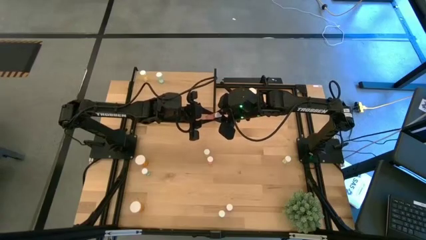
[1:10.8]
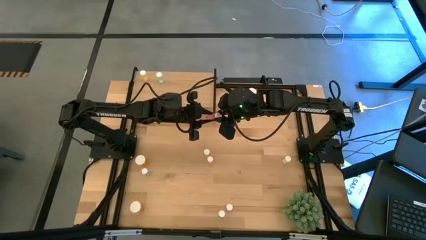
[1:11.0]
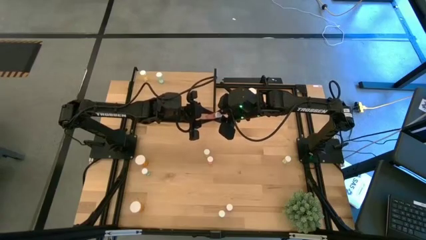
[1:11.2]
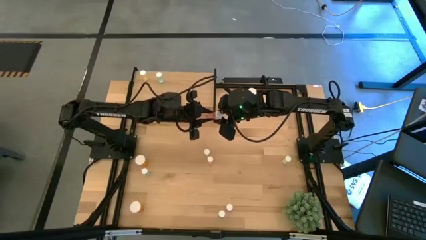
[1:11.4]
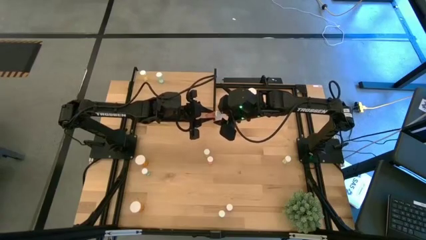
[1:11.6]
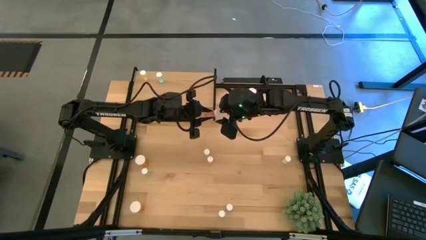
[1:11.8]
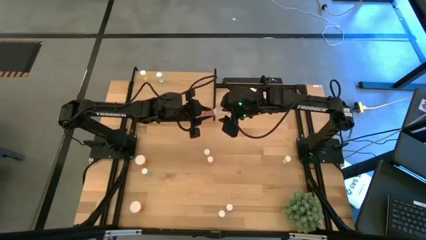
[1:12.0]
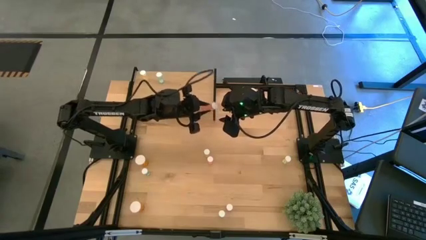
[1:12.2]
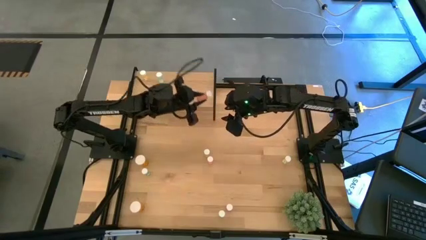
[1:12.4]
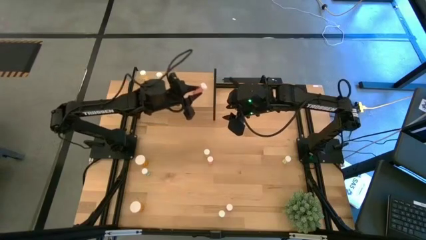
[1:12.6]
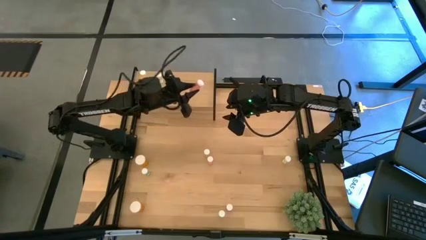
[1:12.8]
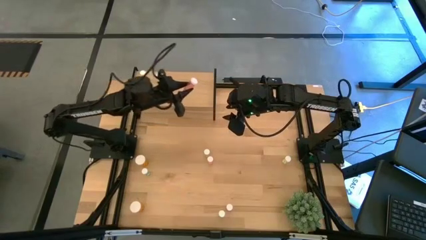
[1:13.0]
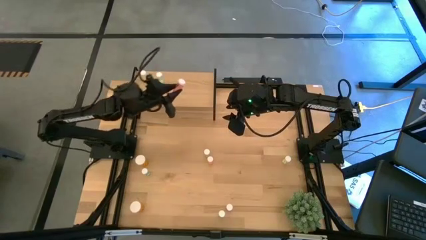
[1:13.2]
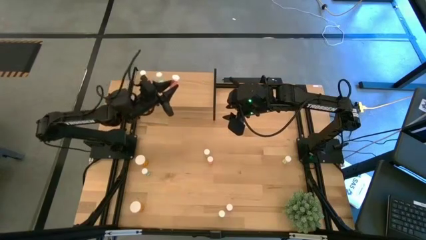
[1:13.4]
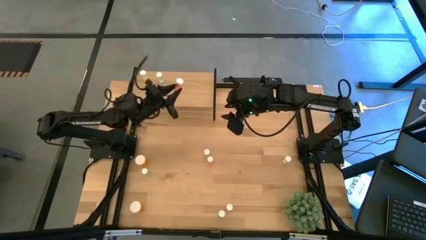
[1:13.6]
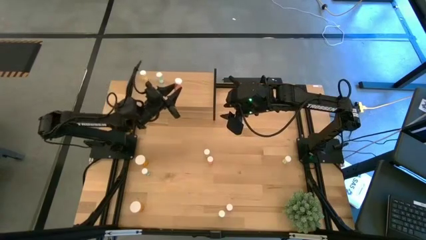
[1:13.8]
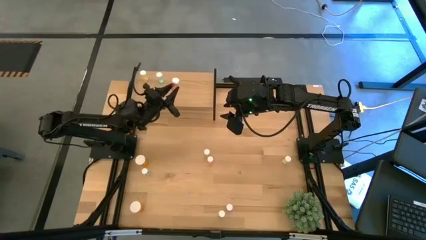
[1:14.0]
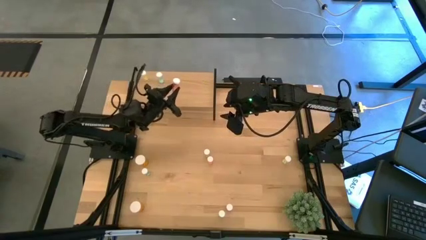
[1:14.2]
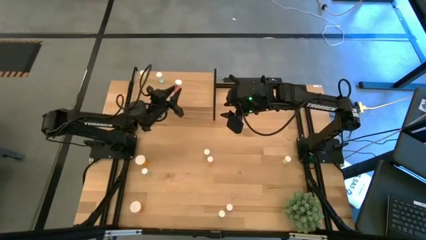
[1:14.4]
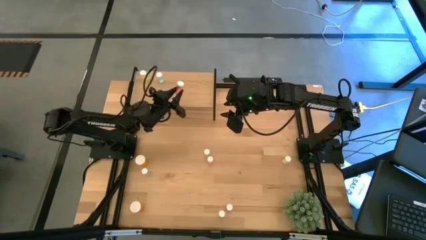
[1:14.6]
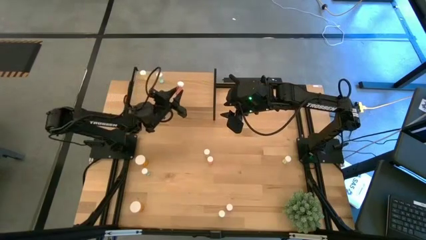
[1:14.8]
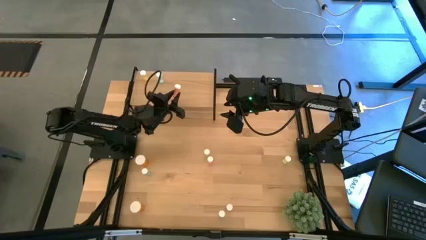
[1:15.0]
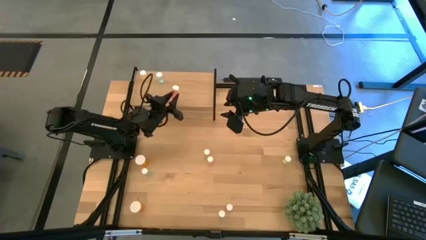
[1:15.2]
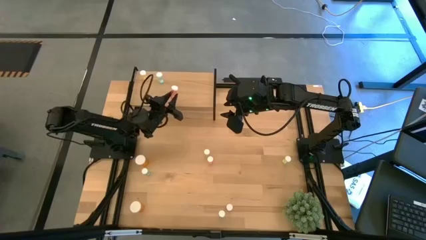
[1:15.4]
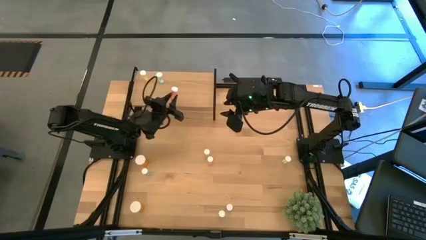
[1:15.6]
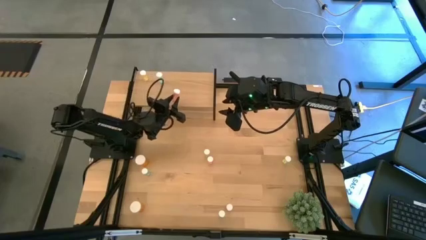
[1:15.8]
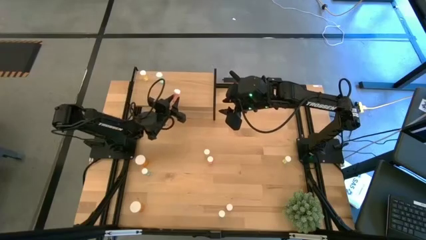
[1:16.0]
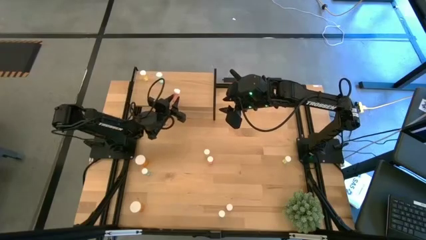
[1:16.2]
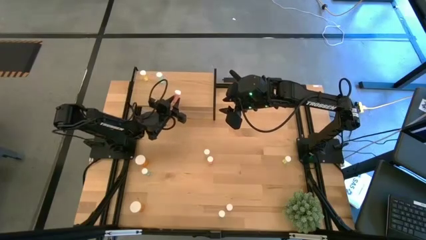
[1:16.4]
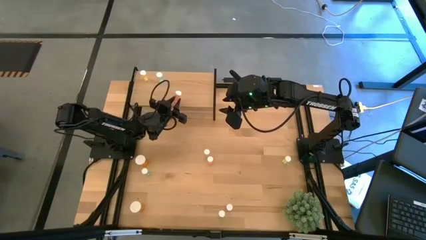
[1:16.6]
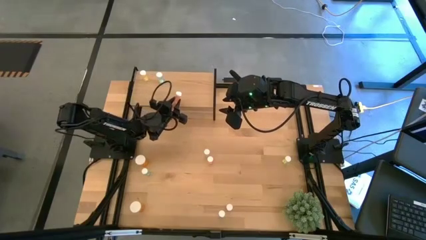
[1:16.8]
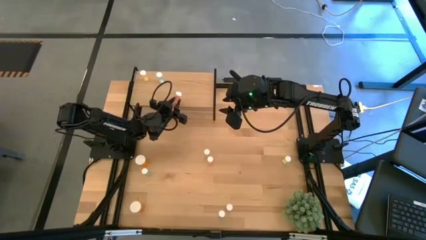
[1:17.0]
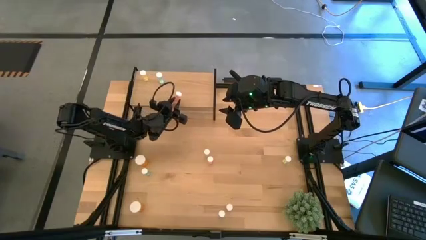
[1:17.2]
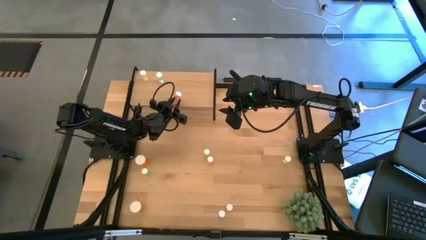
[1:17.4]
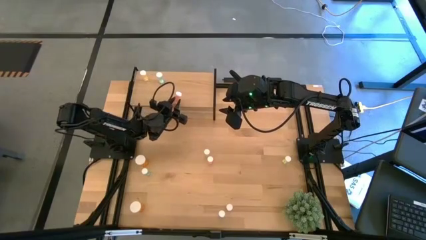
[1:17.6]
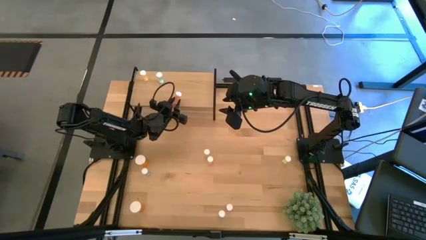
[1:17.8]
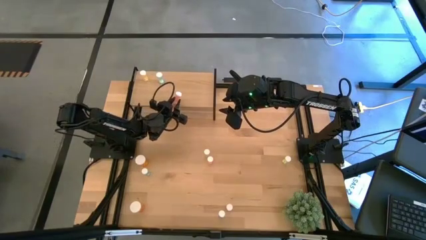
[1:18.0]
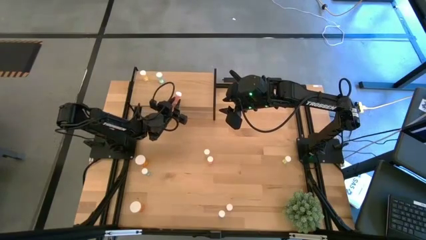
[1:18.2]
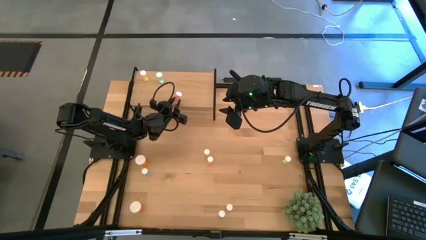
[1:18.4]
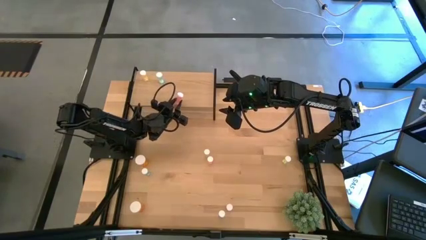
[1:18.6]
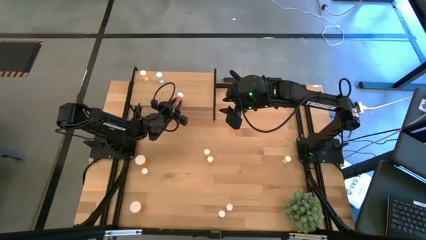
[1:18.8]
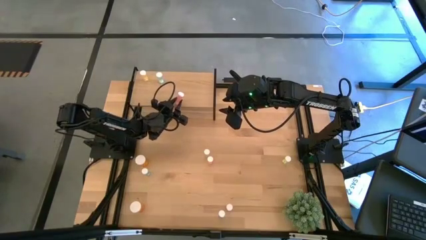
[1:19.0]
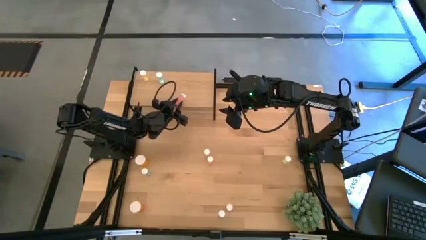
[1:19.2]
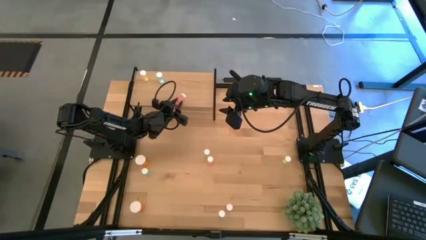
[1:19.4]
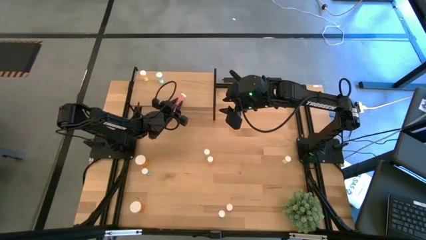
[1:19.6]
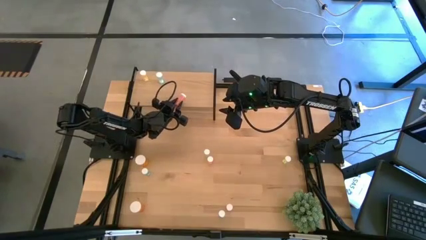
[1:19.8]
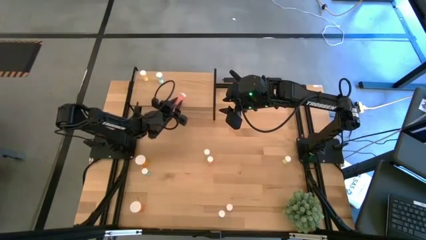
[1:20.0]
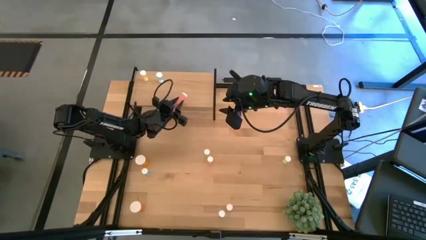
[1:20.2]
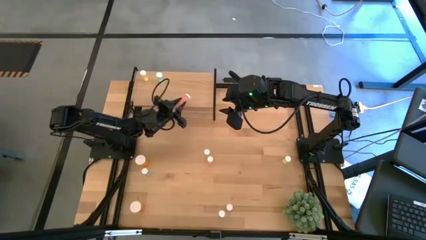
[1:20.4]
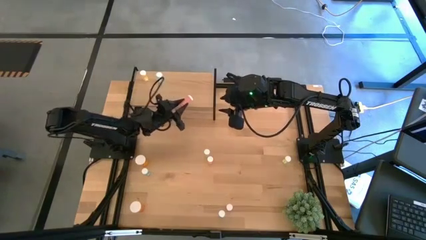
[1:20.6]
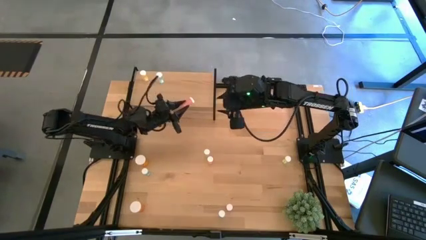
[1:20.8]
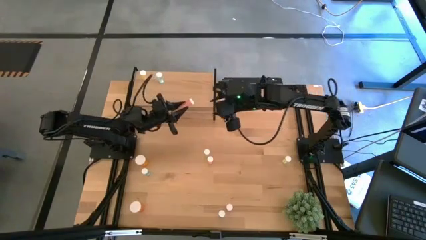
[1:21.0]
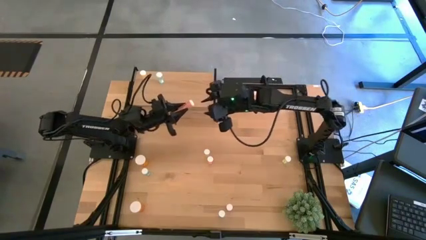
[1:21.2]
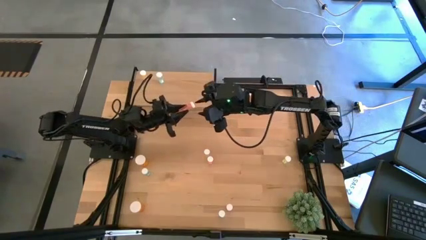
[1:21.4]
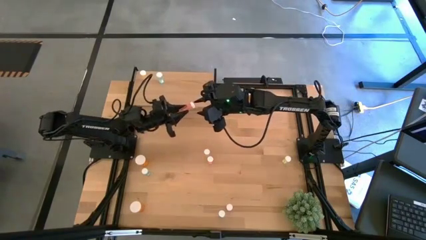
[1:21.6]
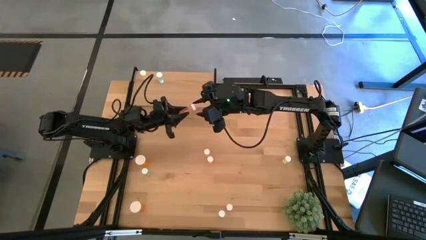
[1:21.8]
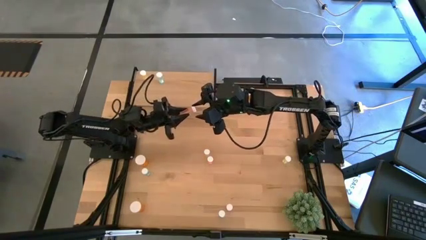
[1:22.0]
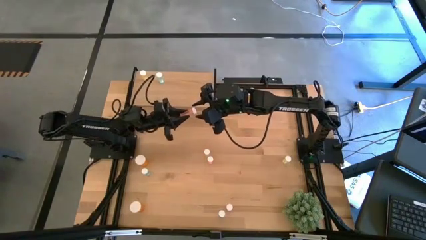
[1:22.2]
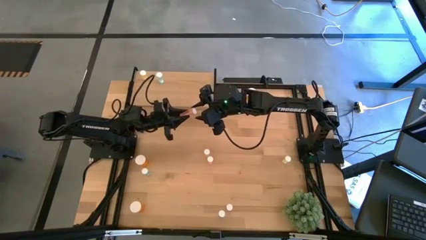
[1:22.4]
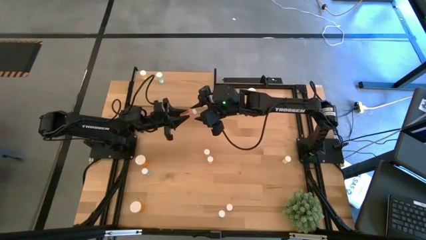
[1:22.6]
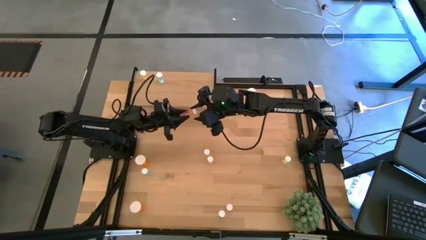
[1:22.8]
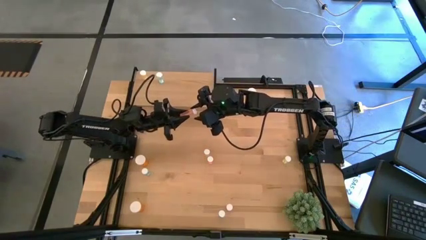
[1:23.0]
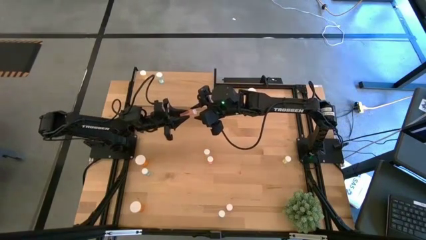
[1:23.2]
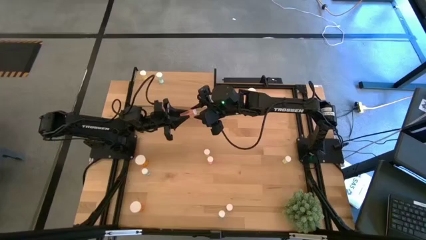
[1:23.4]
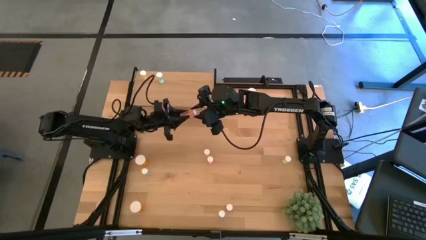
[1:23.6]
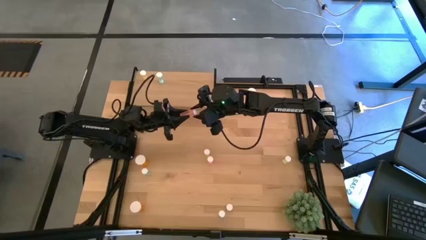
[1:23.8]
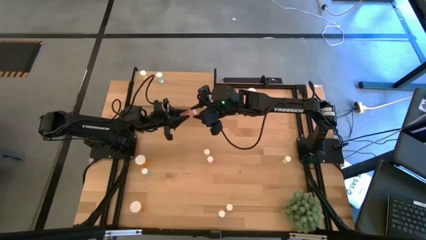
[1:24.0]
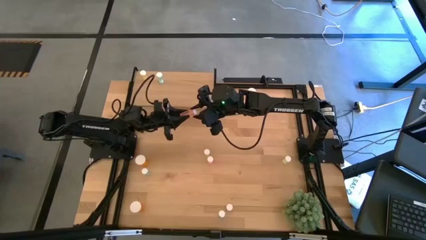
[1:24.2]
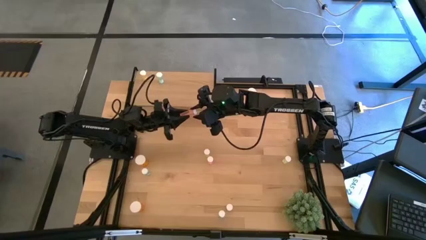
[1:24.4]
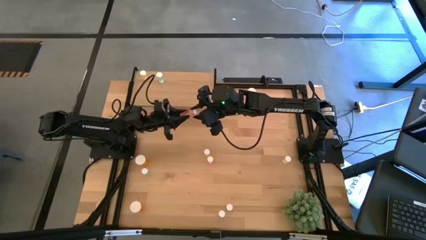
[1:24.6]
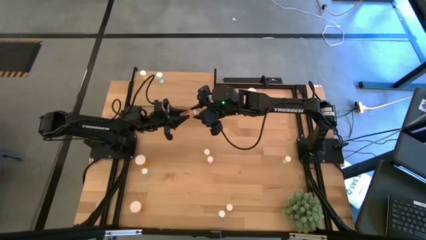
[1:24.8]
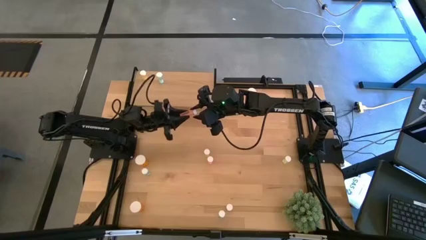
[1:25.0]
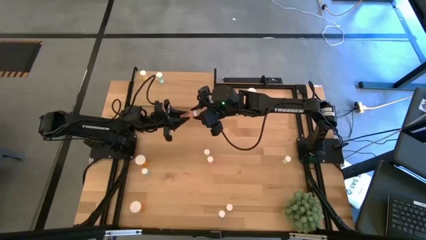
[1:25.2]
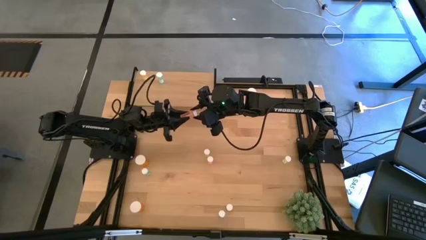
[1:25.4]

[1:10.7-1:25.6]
Task: Pick and place medicine bottles onto shelf by color
Put the top right small red pill bottle on the shelf
